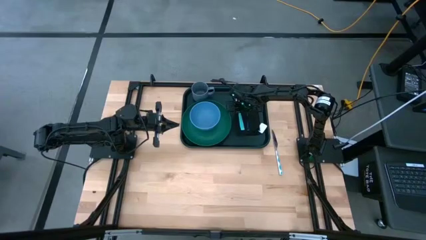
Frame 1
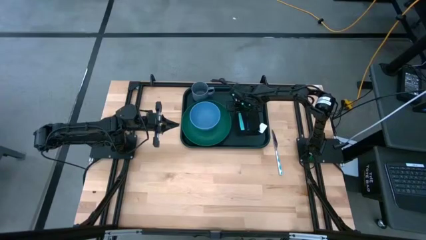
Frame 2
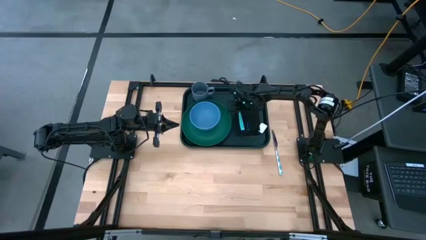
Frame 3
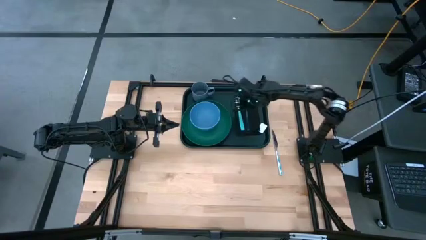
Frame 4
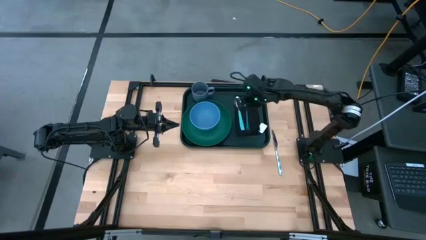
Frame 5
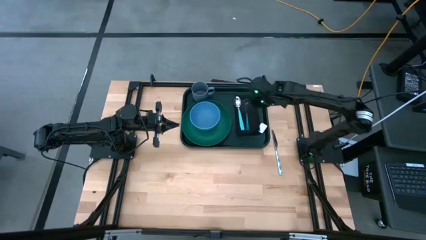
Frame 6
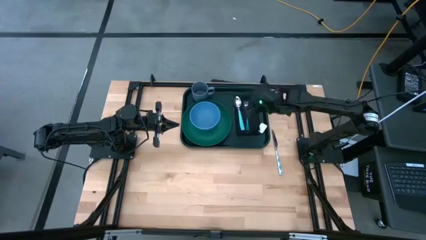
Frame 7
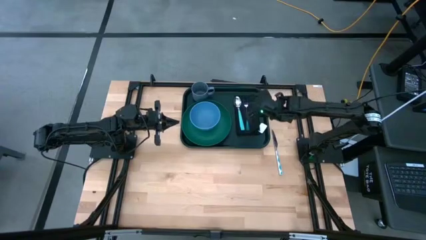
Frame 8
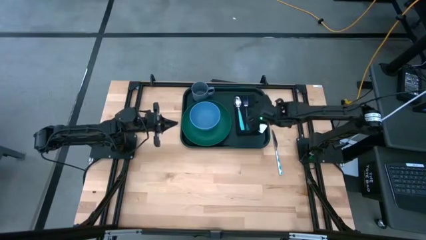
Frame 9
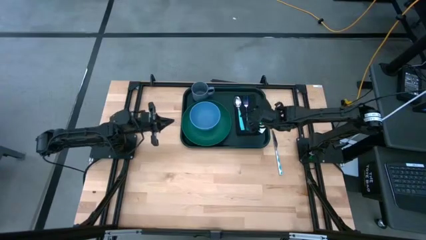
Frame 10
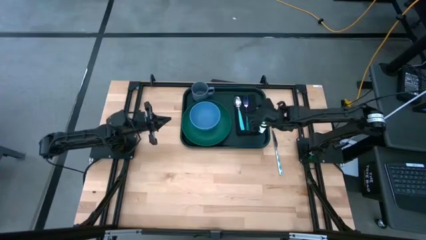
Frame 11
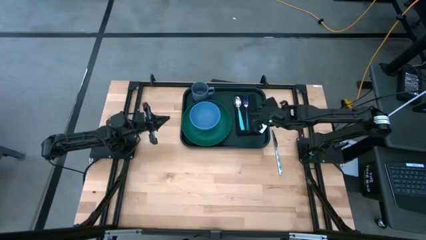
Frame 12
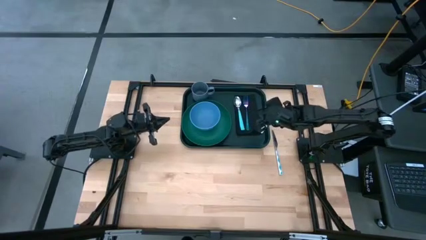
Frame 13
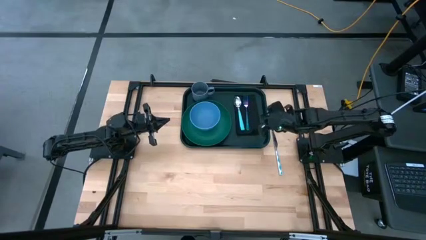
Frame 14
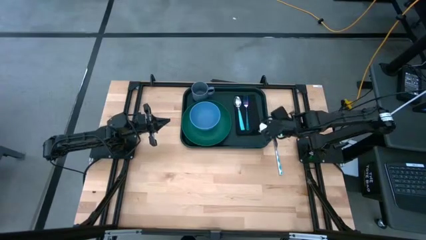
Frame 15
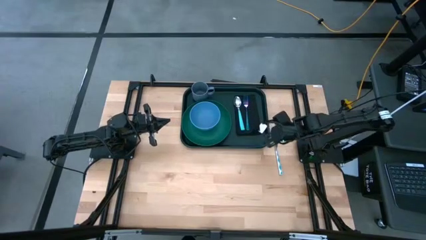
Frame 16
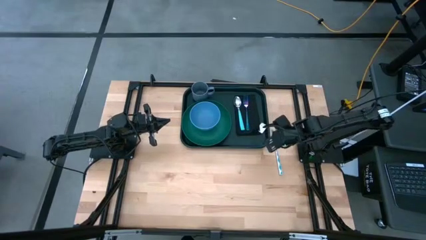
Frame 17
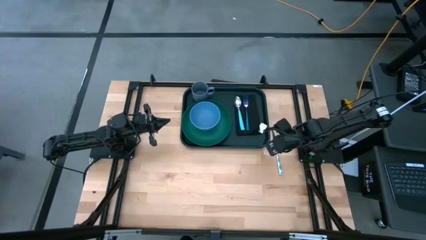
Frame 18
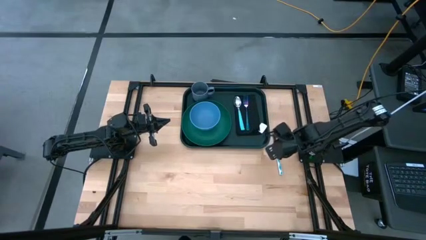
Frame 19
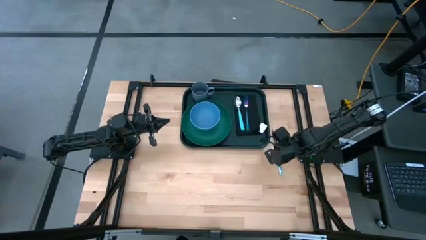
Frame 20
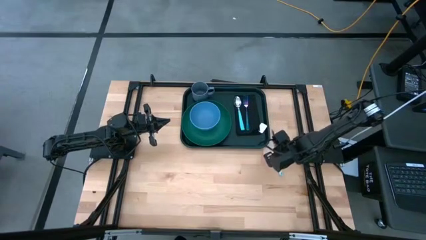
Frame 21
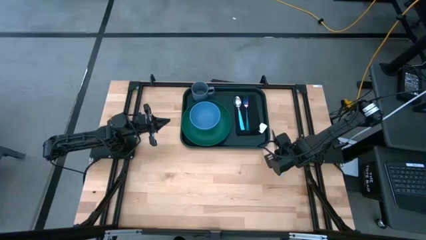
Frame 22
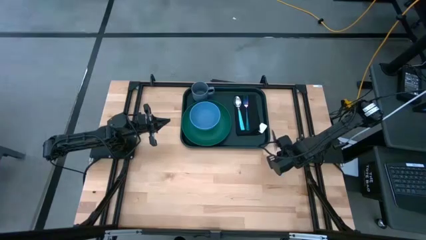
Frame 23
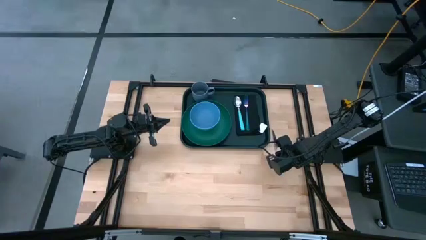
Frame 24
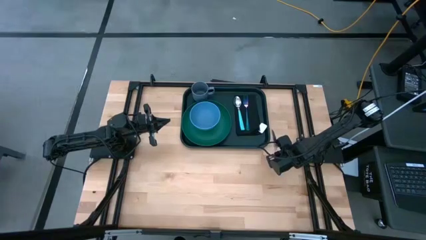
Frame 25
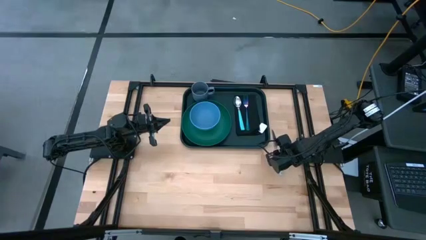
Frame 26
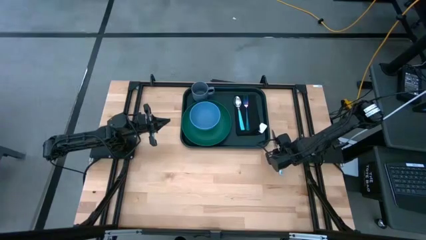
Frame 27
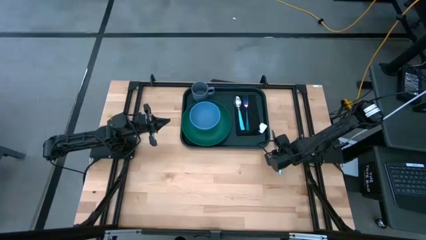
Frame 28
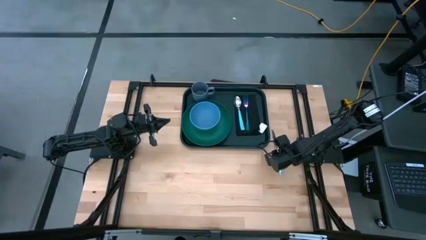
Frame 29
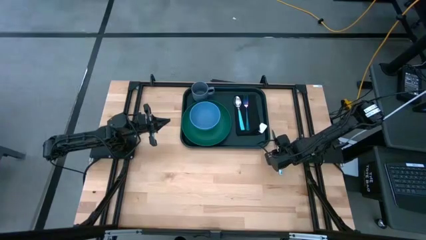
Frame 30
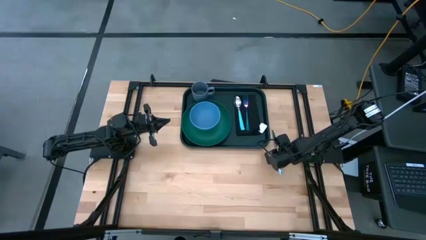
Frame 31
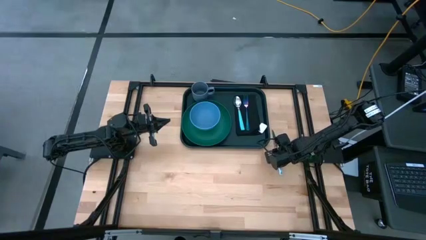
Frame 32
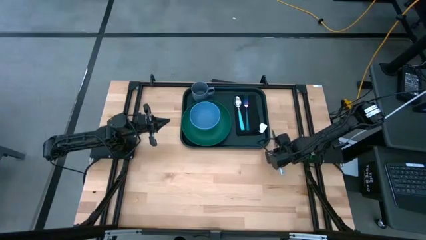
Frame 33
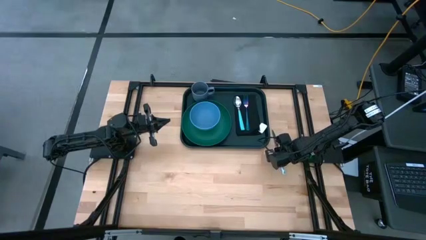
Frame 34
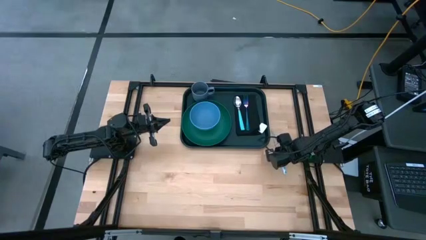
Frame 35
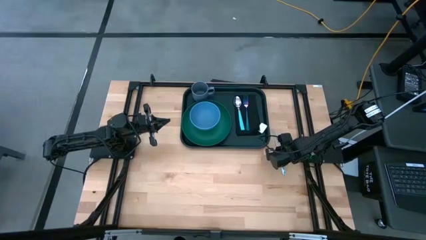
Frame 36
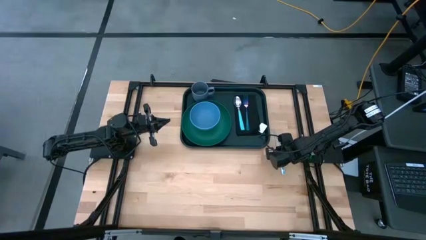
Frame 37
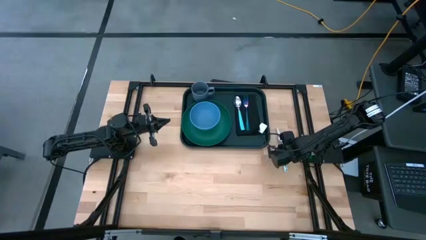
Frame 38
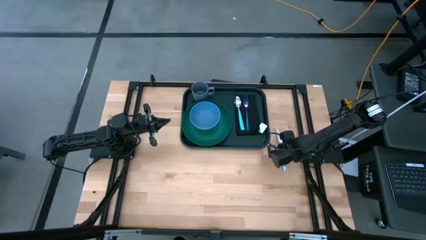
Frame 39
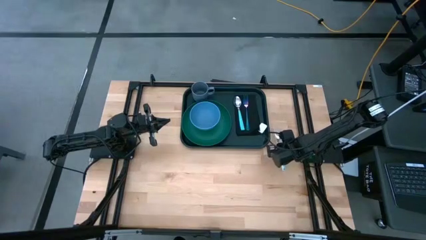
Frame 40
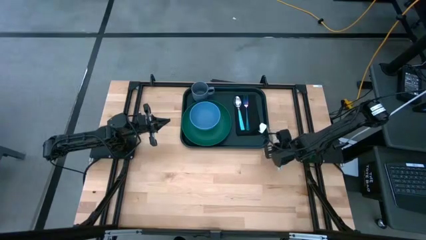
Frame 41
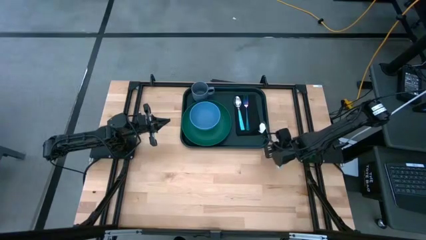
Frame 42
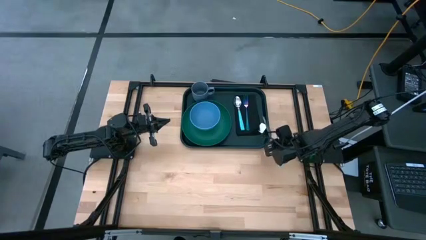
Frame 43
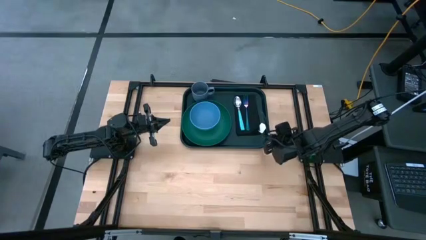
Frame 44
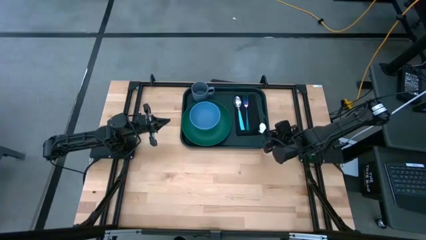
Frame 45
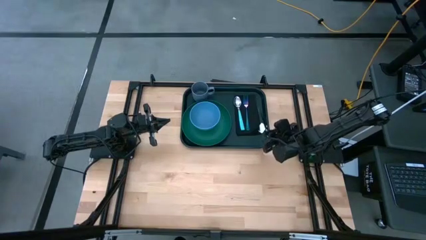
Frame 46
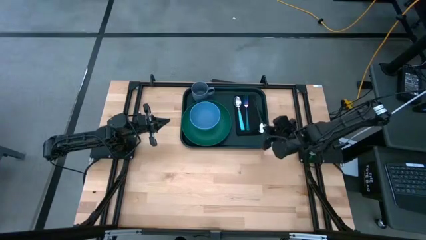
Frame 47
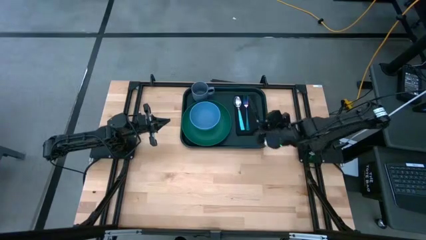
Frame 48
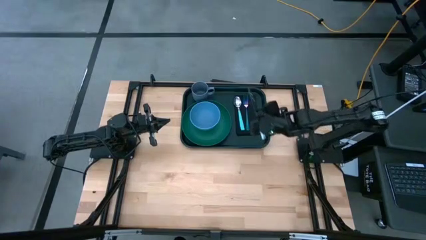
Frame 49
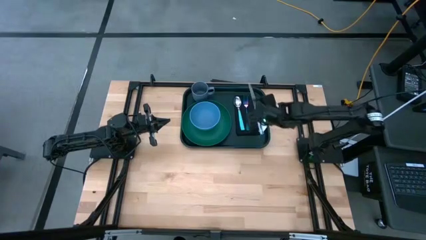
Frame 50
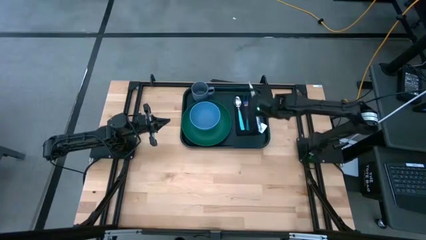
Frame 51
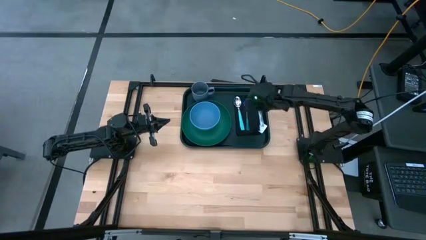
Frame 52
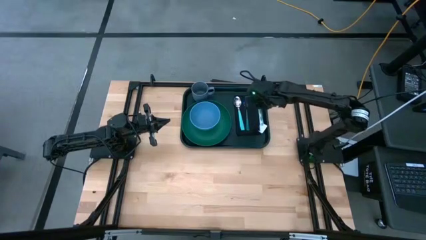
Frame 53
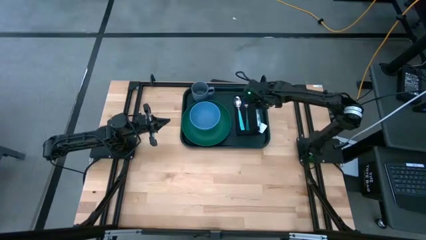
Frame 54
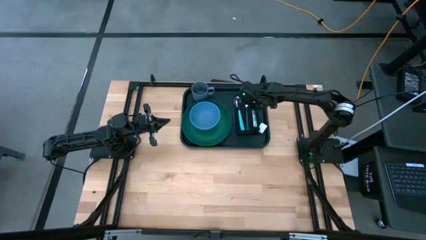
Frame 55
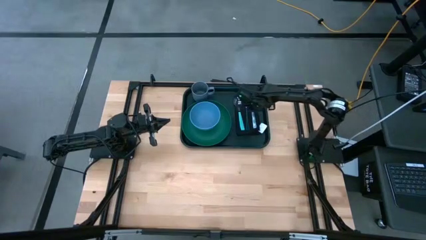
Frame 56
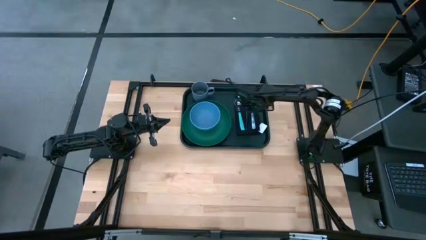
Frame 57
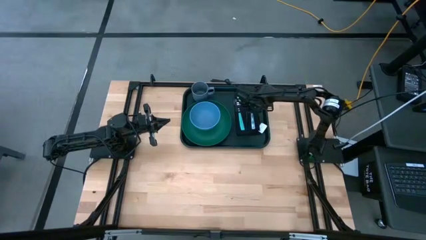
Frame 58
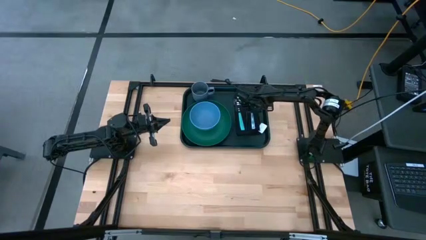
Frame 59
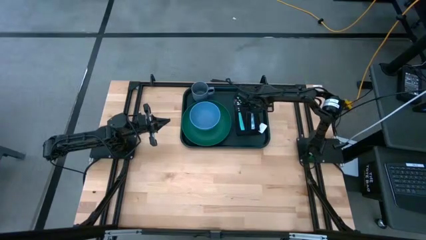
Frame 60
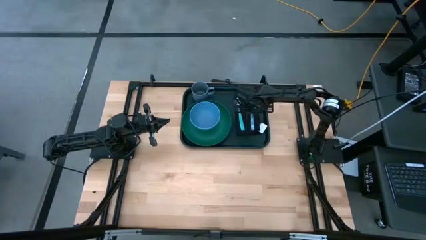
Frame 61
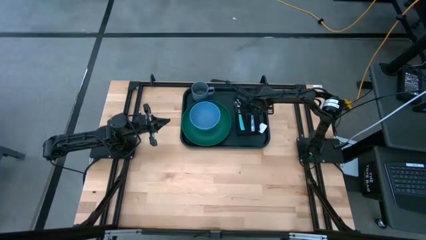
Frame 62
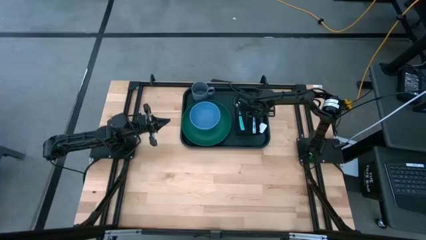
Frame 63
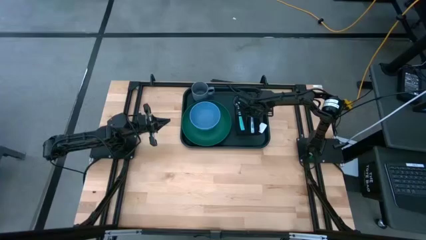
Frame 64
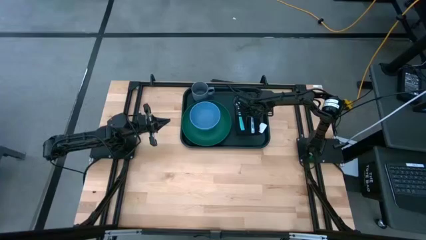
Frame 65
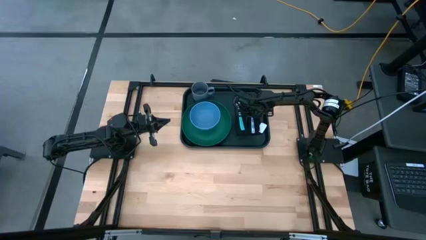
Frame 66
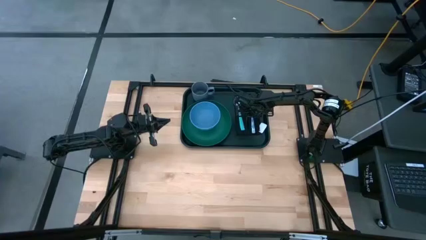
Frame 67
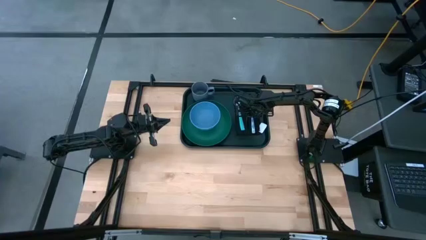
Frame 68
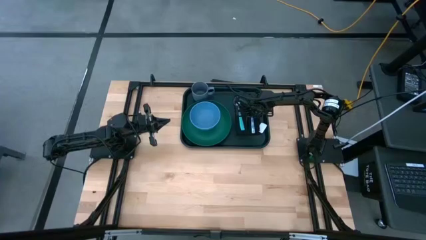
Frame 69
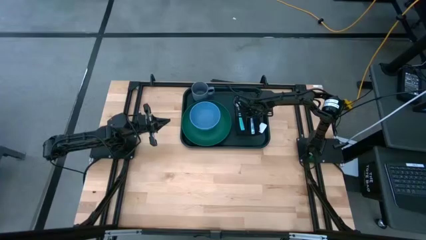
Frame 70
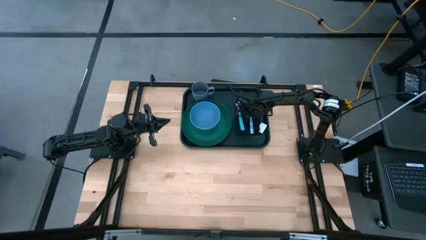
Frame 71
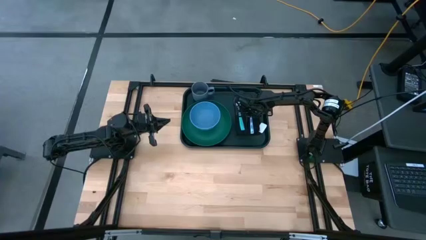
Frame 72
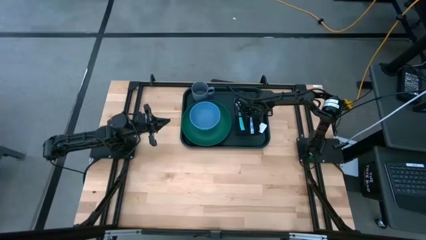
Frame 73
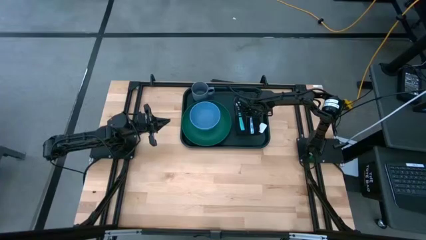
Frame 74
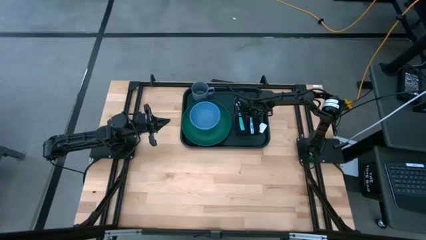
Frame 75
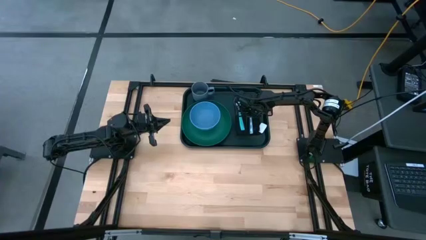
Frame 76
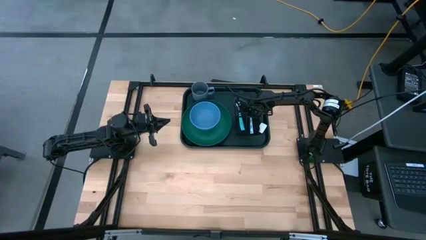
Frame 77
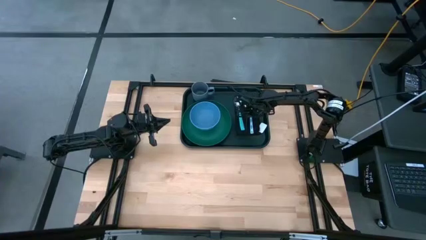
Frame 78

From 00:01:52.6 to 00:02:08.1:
Task: Set up tray
Put the blue knife to the right of the blue fork on the black napkin
